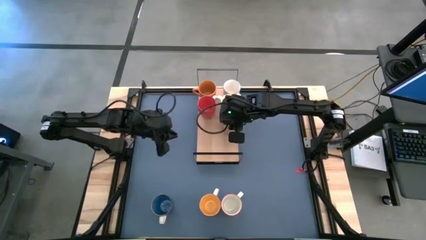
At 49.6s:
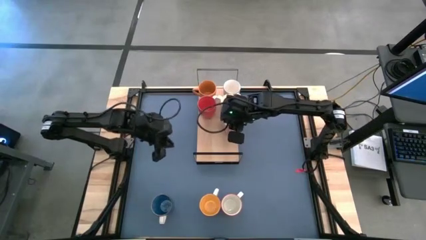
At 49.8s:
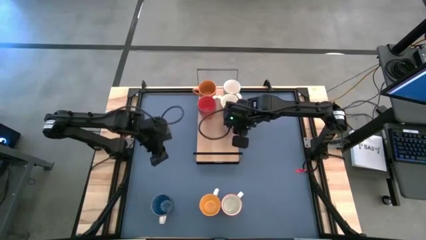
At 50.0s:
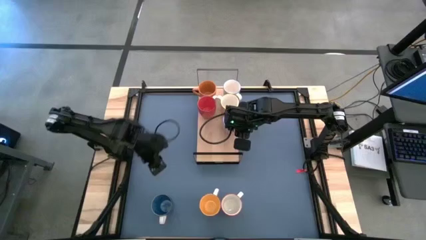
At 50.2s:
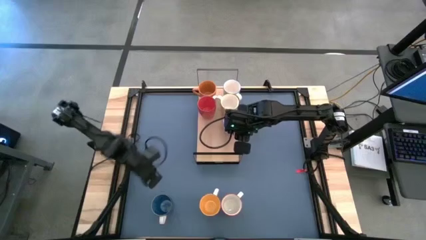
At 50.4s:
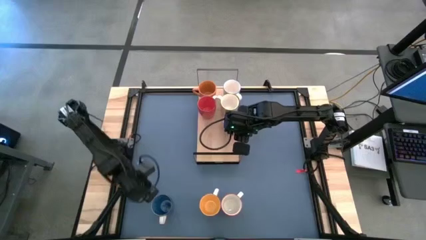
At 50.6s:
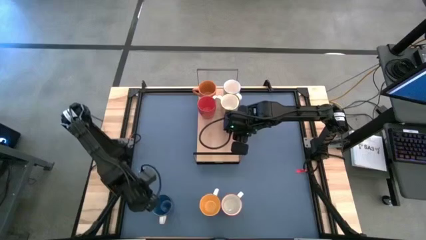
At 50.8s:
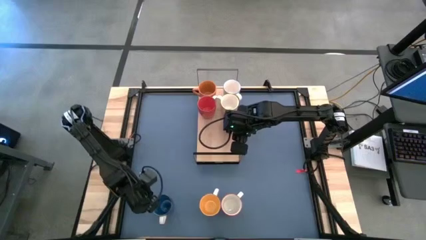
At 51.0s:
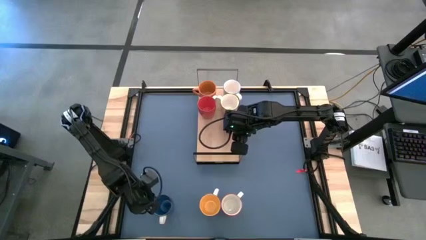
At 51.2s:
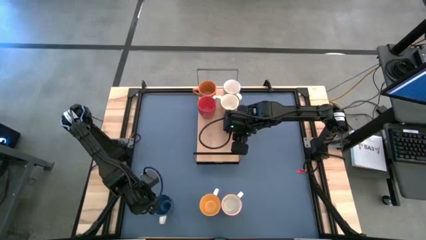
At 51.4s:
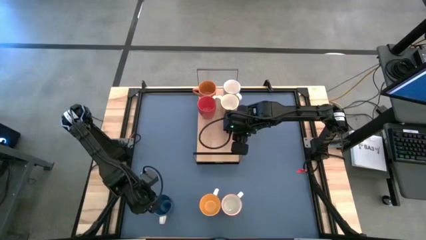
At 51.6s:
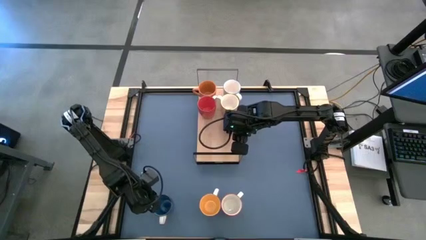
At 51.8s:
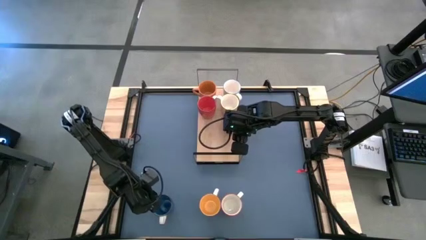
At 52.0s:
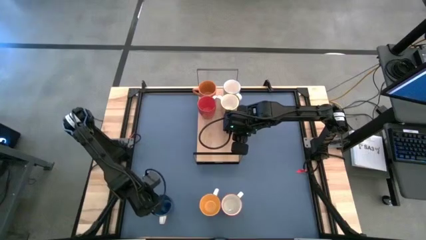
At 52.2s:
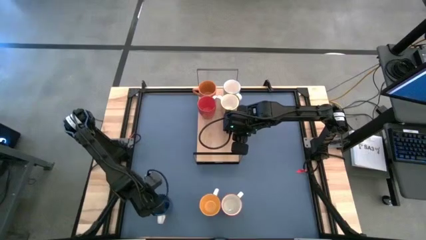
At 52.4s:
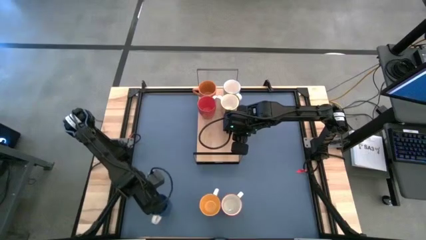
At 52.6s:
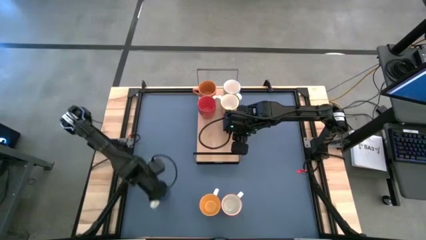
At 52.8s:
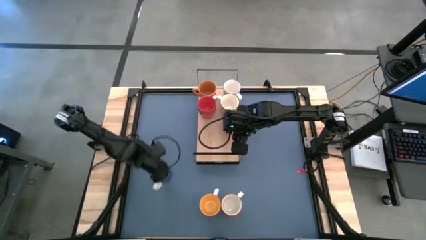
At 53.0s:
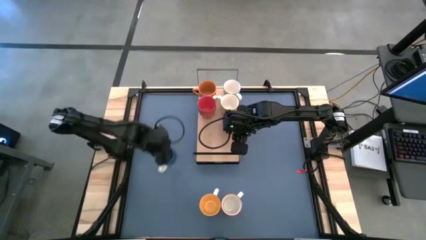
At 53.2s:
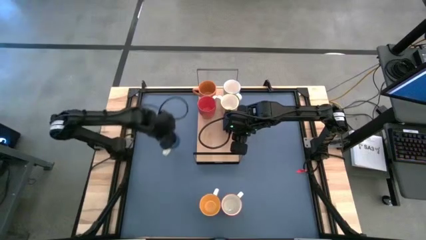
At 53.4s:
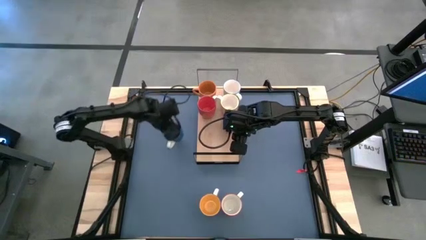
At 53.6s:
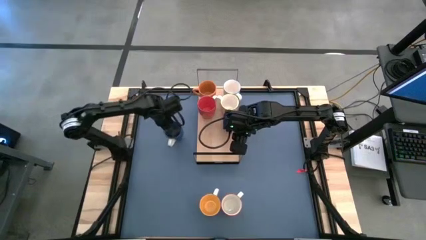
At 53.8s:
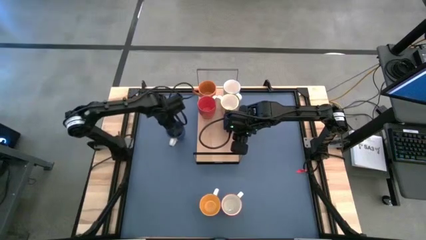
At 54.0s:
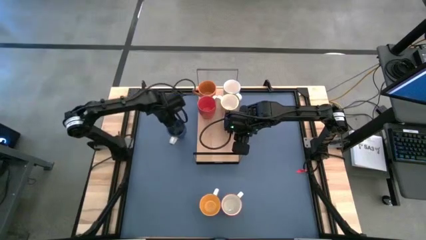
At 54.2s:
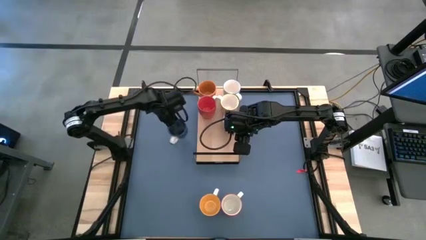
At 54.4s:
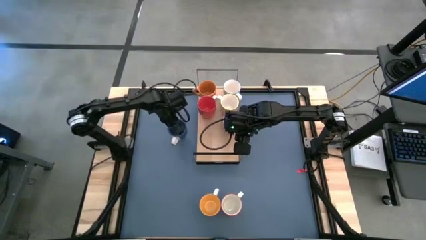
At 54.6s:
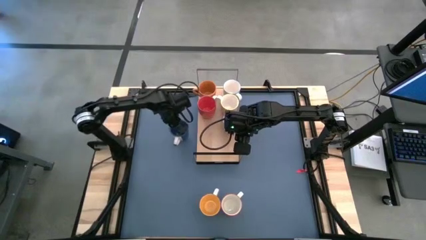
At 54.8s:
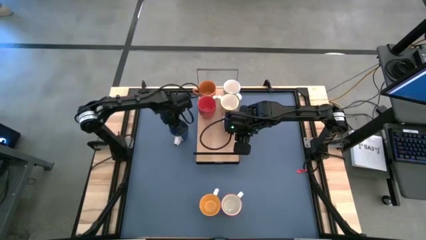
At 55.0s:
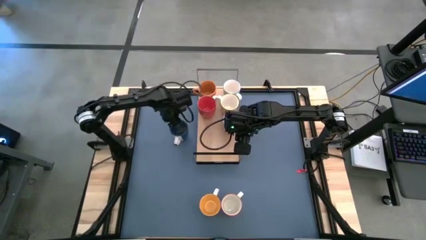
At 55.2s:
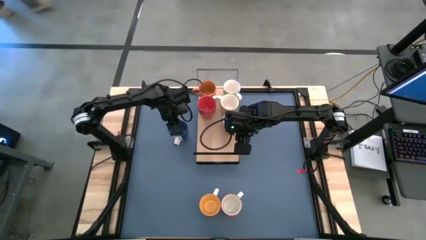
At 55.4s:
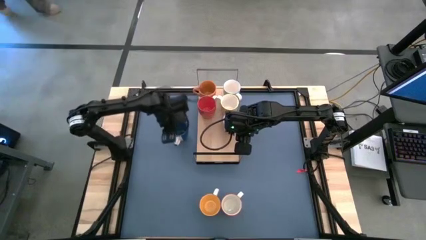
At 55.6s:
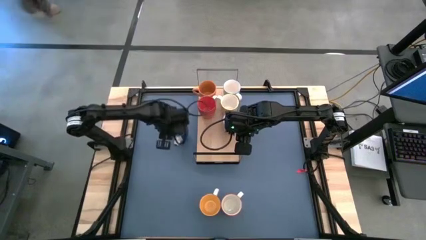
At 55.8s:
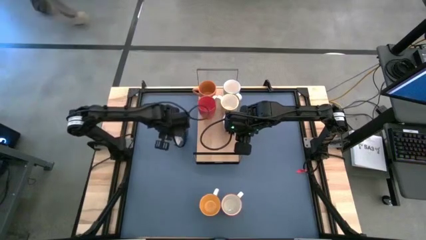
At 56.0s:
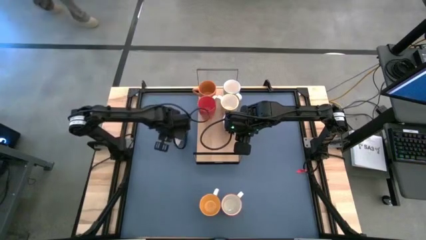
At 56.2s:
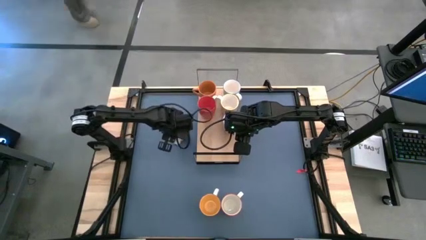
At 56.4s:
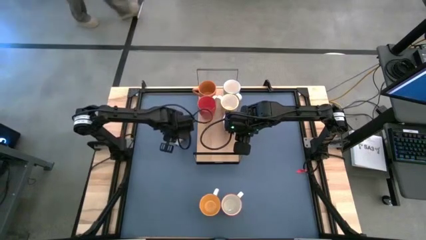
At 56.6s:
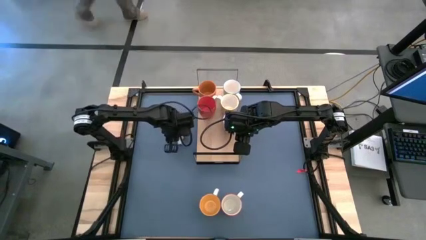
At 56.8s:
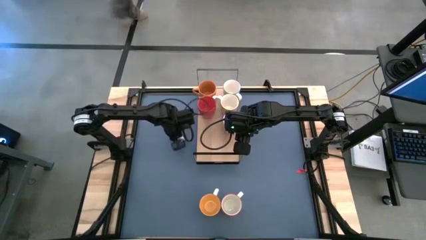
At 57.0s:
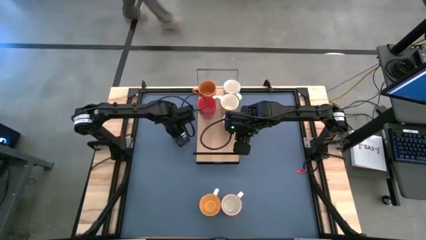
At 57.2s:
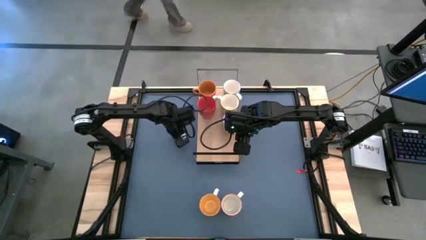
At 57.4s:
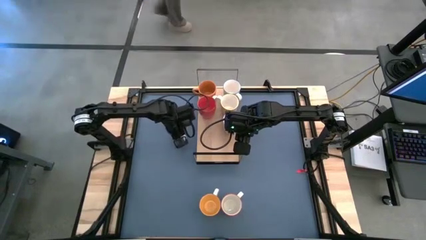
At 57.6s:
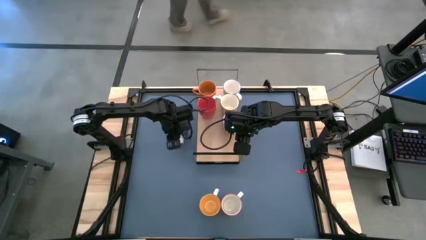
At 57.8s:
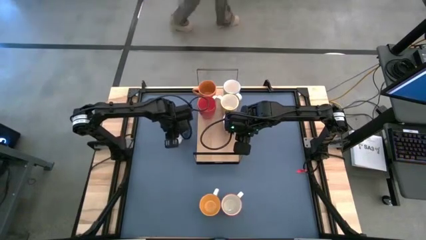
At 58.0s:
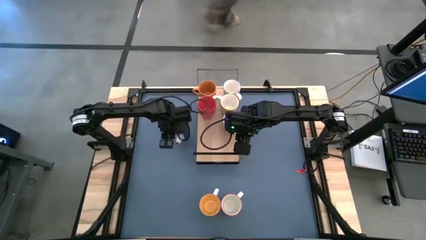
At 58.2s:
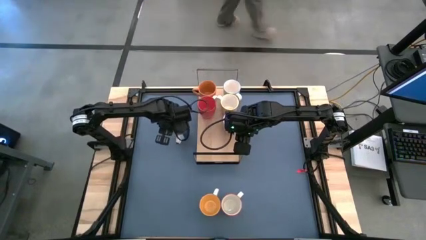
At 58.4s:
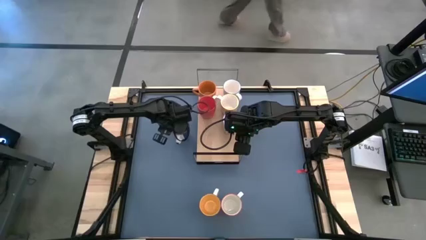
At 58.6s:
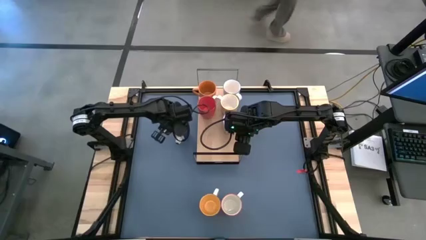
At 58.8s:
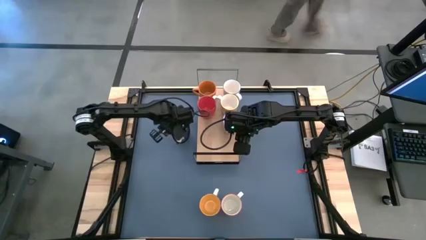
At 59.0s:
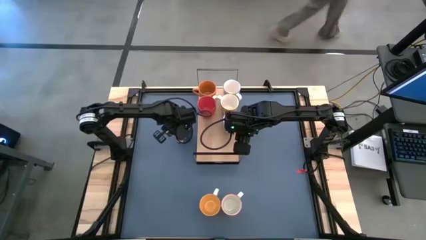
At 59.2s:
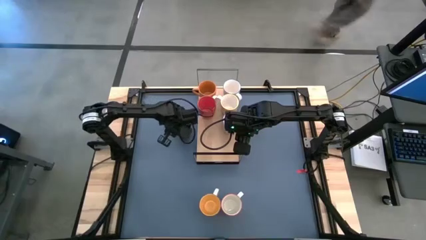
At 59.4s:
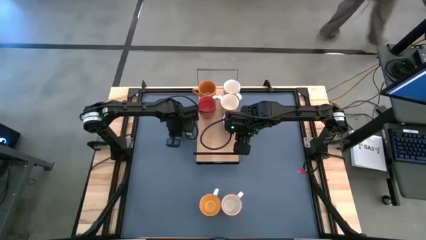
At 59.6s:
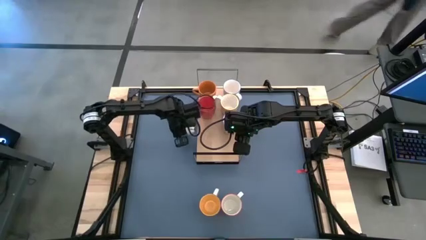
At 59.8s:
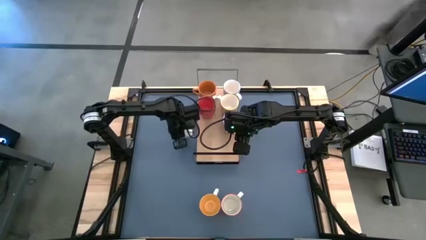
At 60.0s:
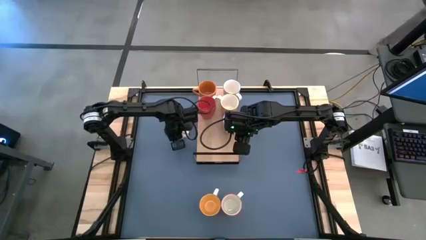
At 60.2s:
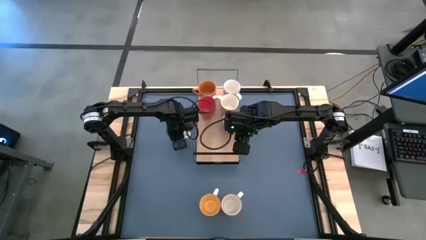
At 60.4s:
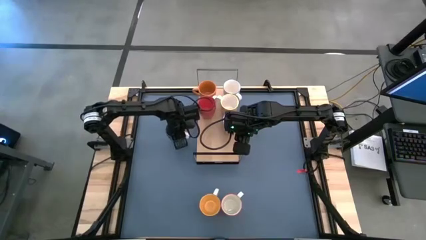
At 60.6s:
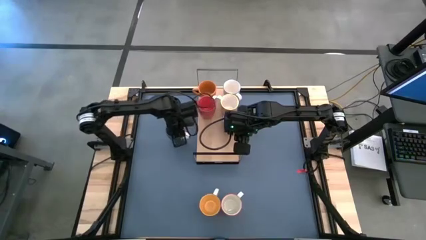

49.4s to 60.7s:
Task: Place coffee mugs
Put the blue mug on the shelf
